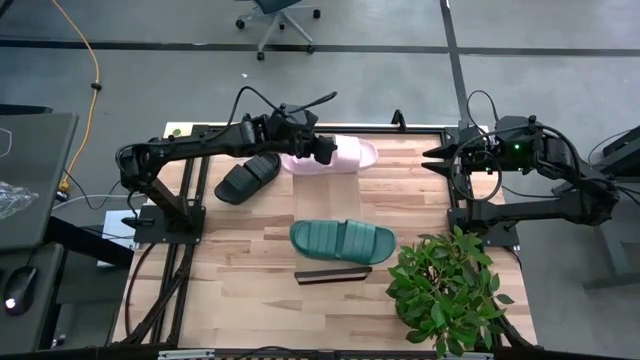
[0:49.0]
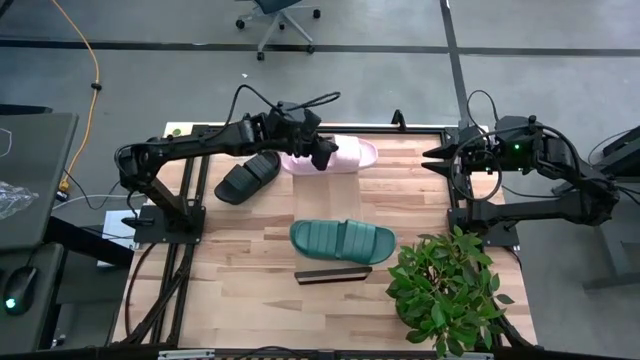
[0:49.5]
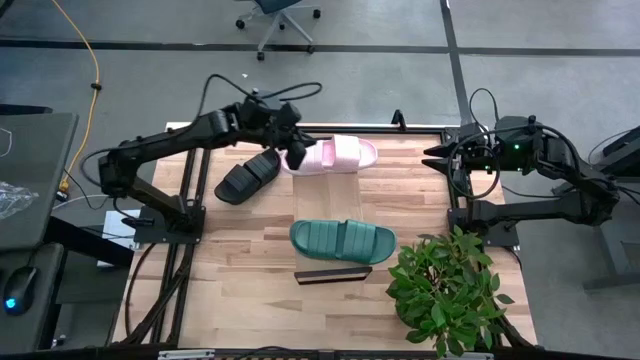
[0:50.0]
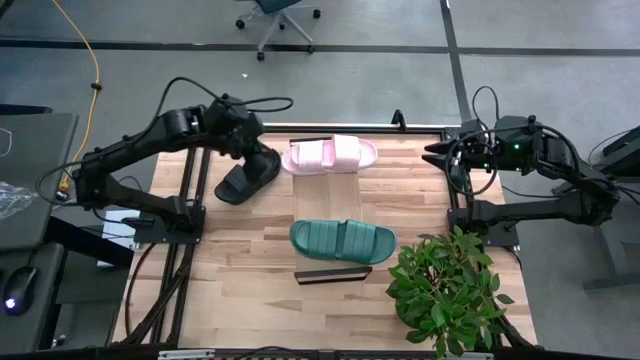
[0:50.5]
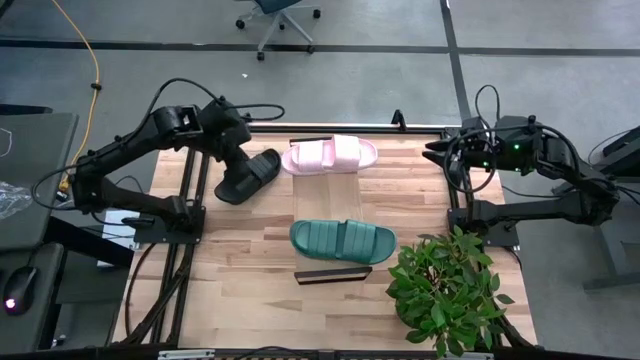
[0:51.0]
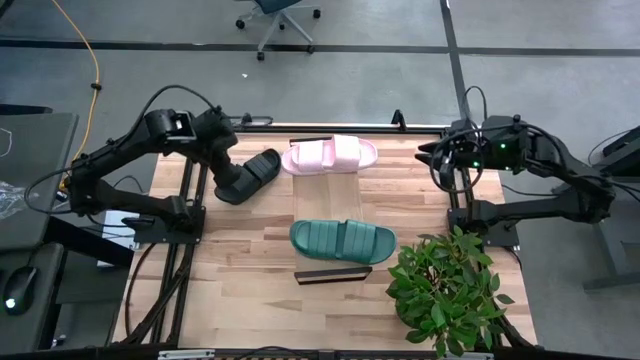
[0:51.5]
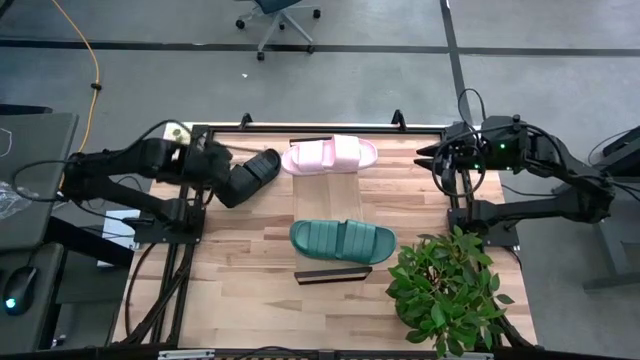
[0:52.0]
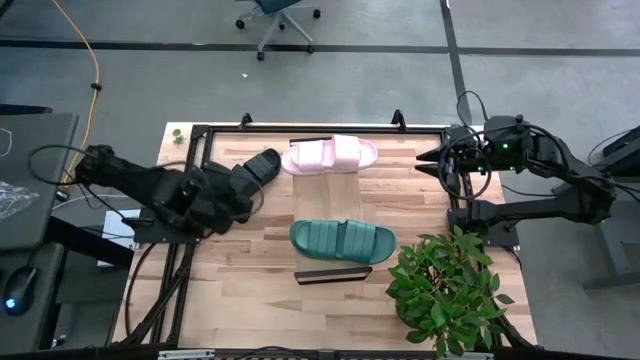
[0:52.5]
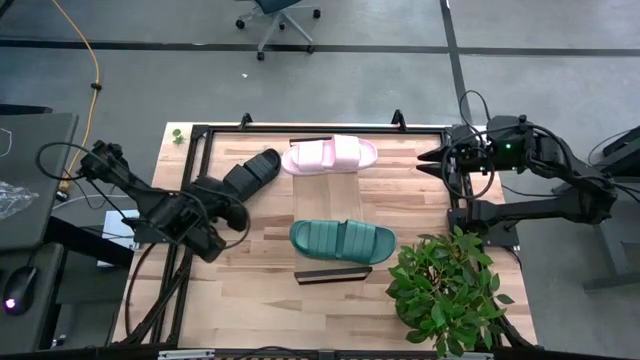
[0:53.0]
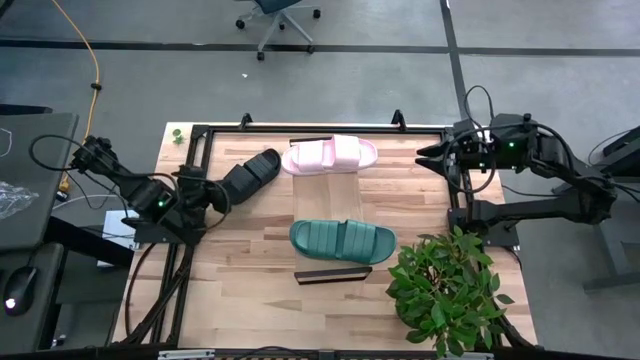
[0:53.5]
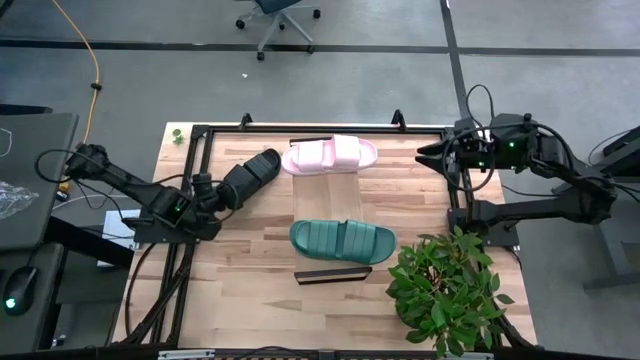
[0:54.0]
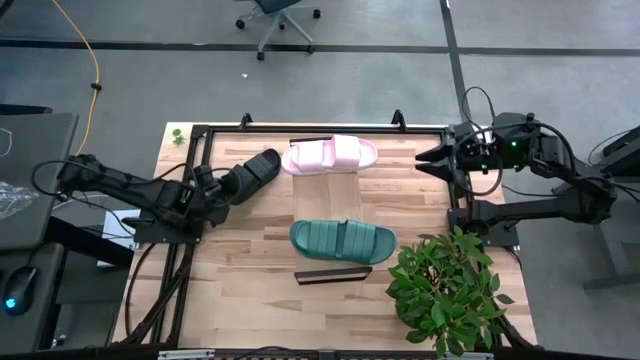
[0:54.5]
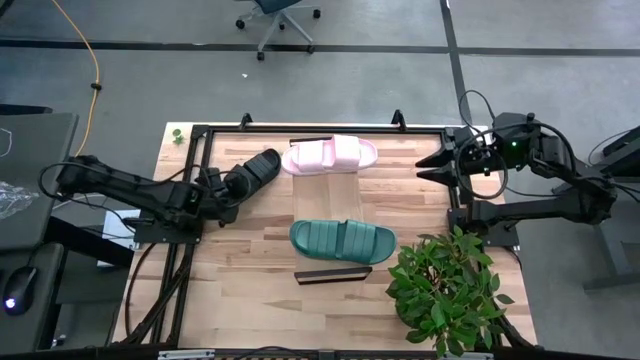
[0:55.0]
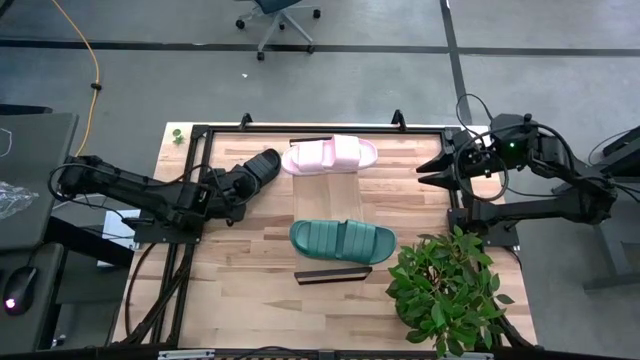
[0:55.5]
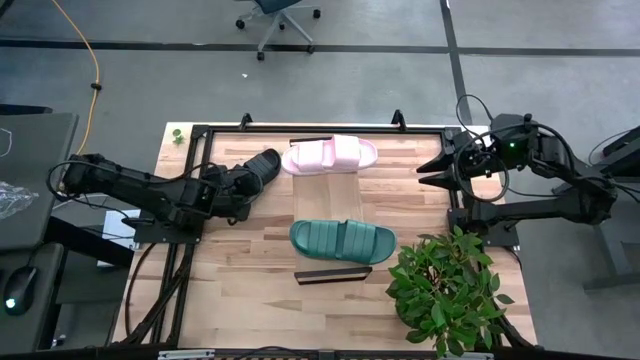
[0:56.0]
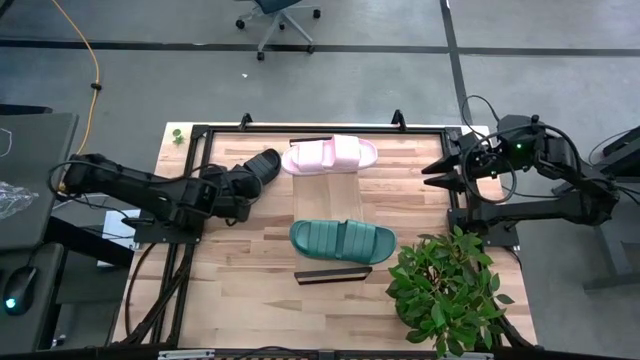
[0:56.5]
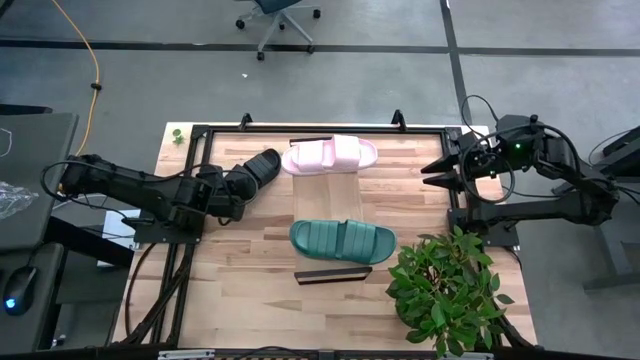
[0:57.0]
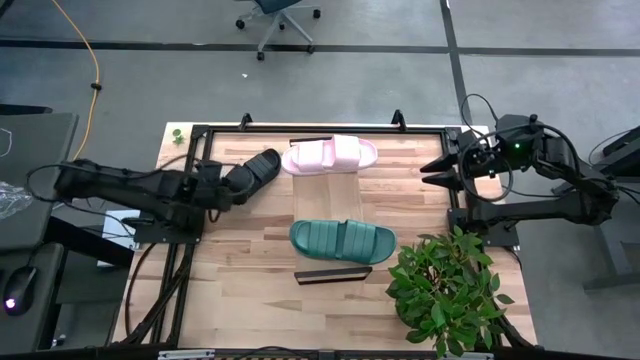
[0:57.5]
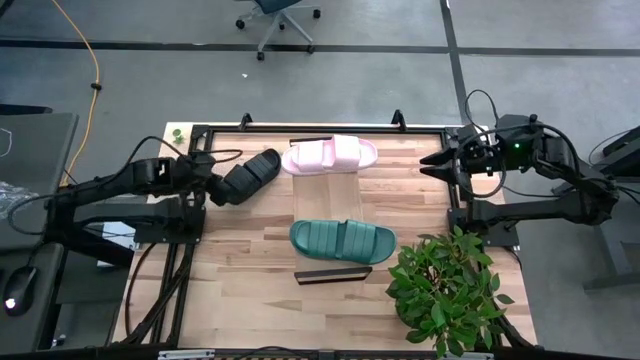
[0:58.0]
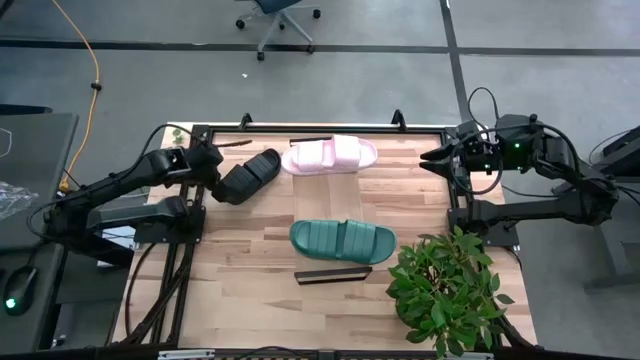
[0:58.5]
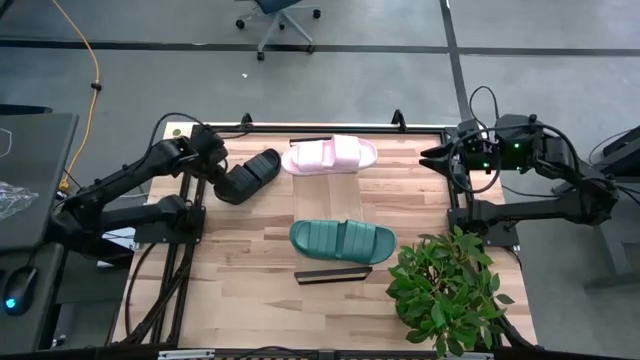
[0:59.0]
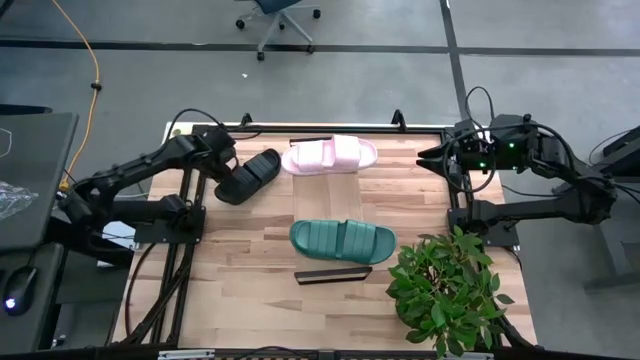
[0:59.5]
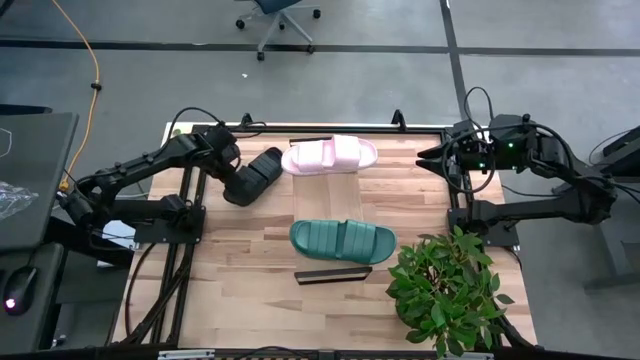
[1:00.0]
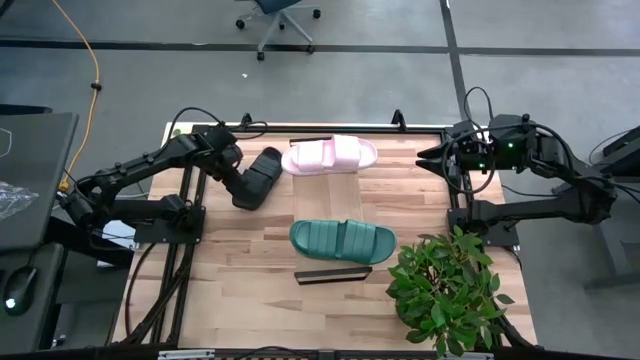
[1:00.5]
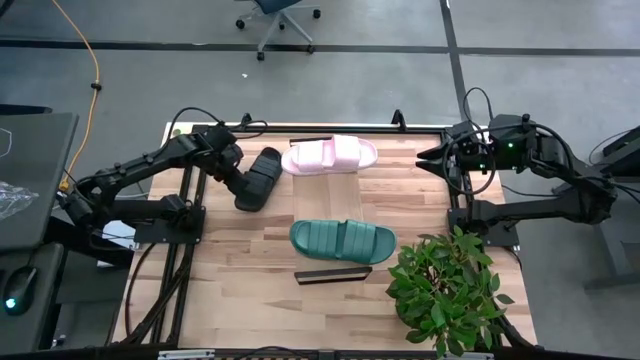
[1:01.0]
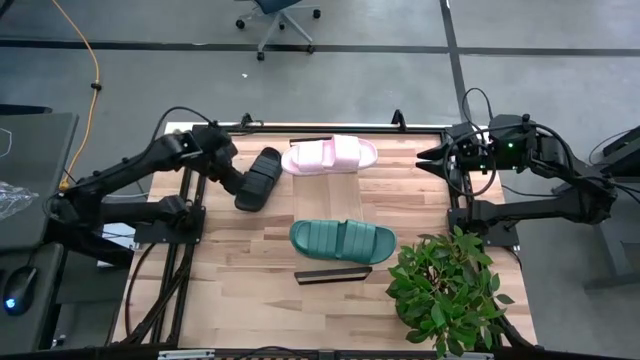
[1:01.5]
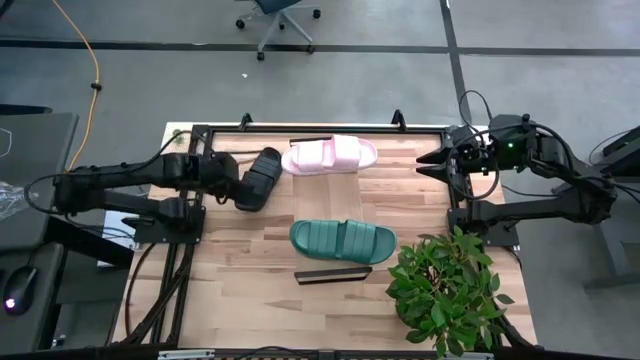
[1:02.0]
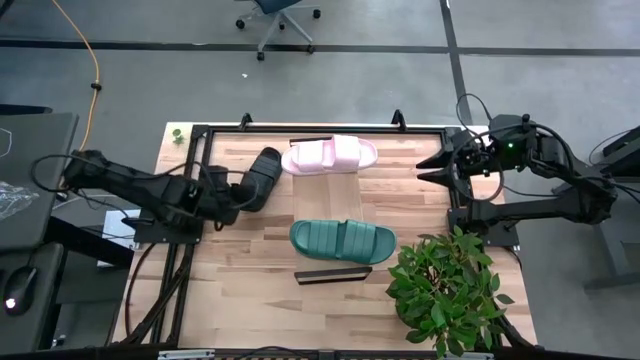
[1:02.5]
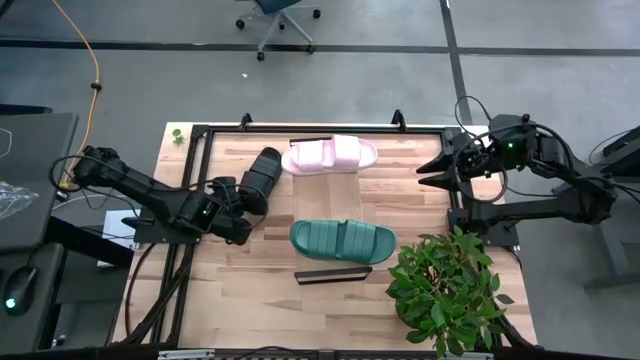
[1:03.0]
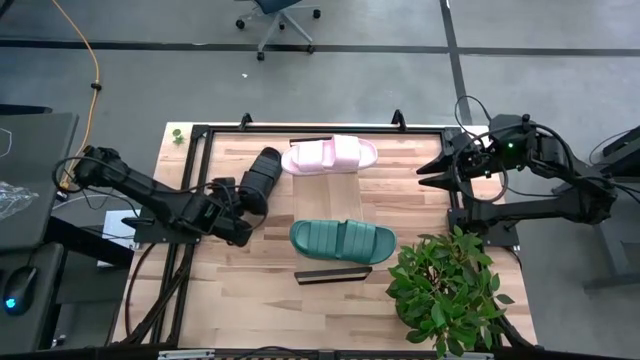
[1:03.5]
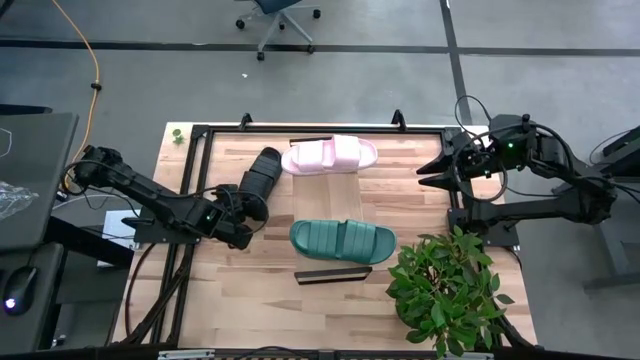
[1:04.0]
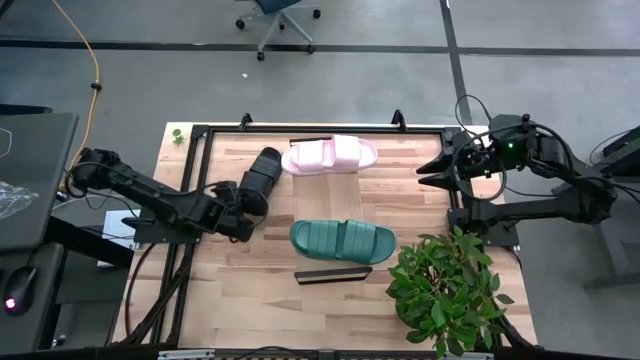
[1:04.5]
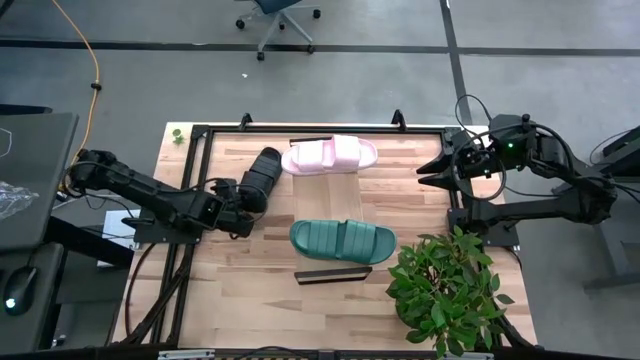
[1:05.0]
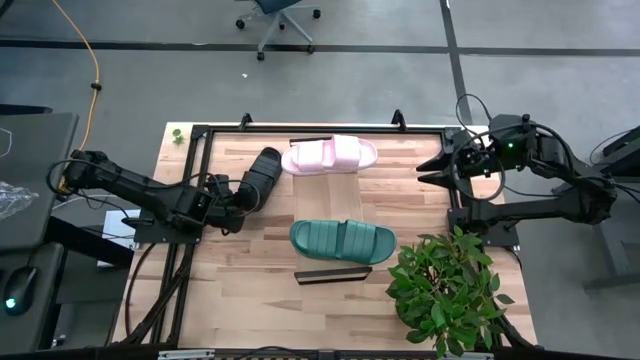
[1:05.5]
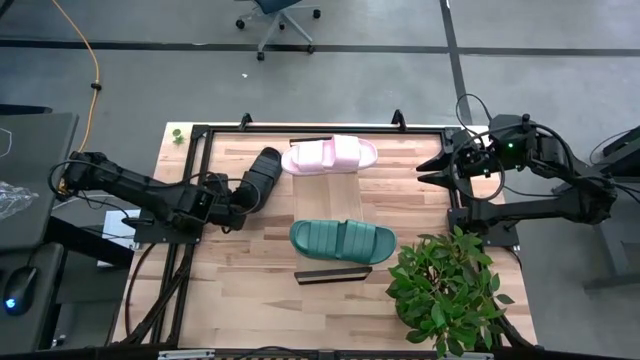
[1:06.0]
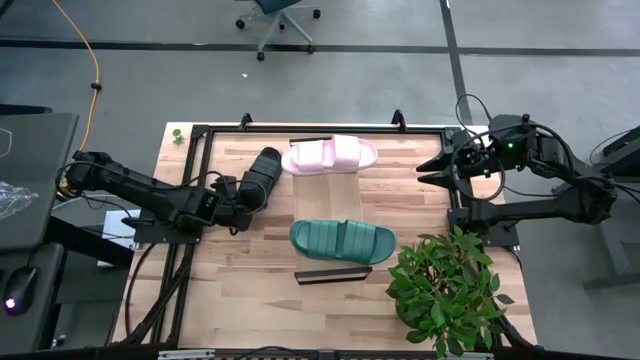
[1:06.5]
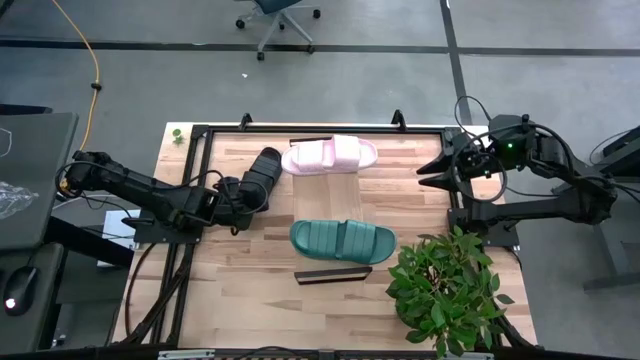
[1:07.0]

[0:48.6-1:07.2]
Task: Pick and place slippers onto the shelf
Put the black pair of slippers on the shelf

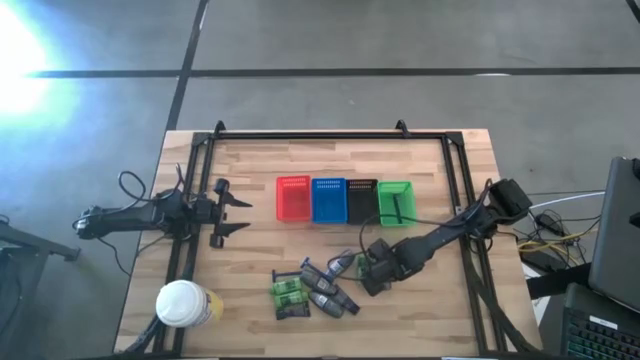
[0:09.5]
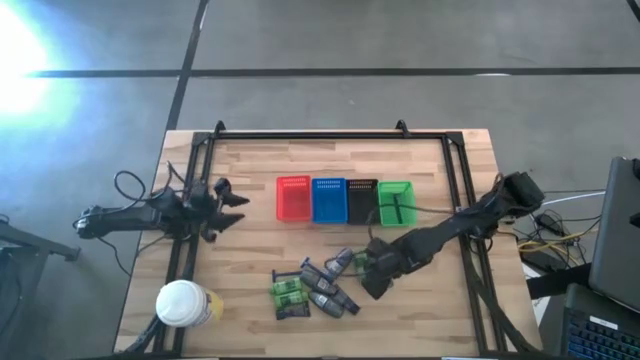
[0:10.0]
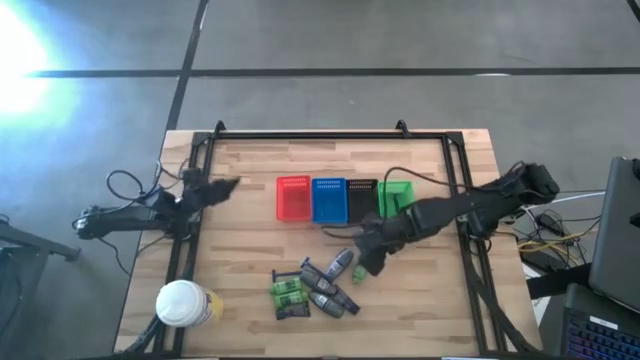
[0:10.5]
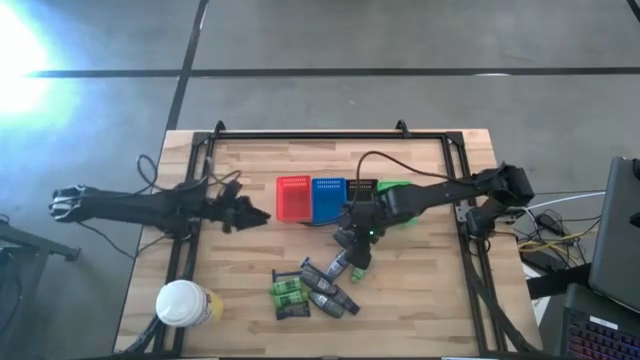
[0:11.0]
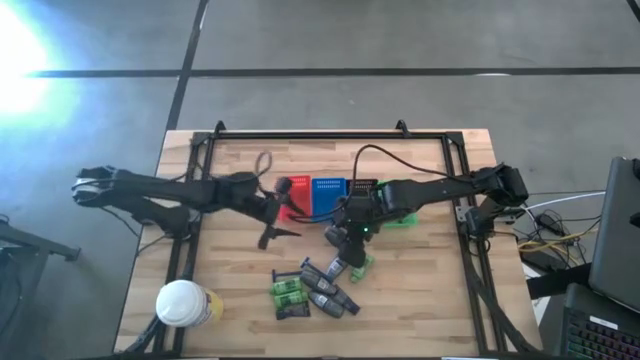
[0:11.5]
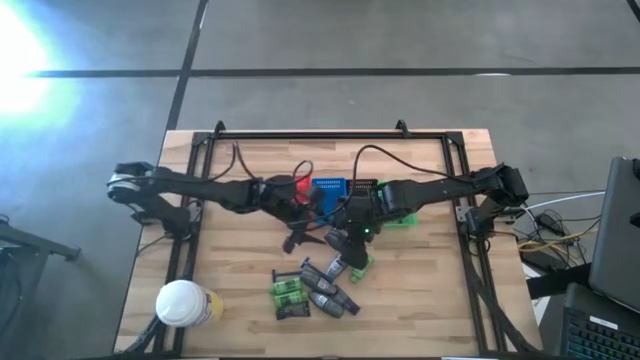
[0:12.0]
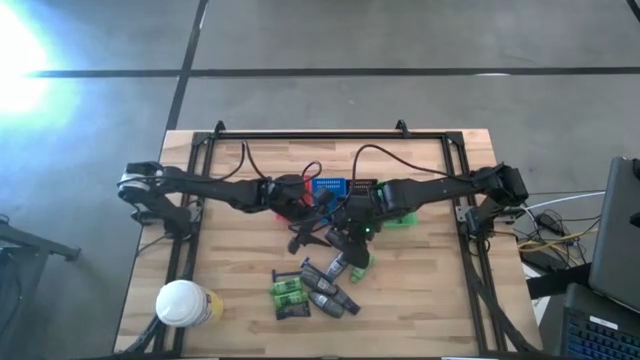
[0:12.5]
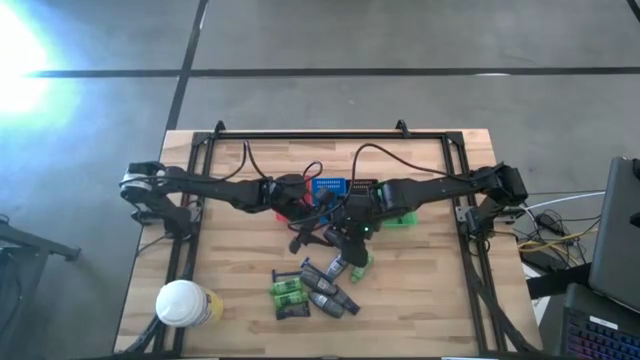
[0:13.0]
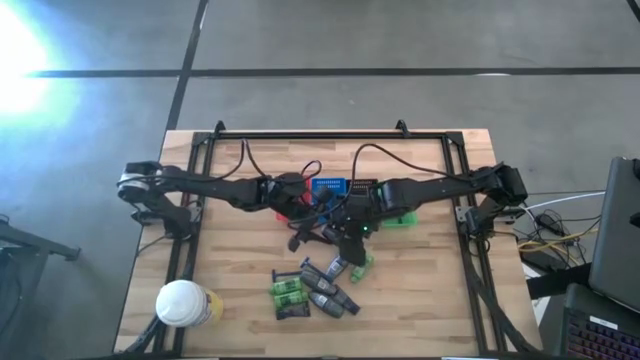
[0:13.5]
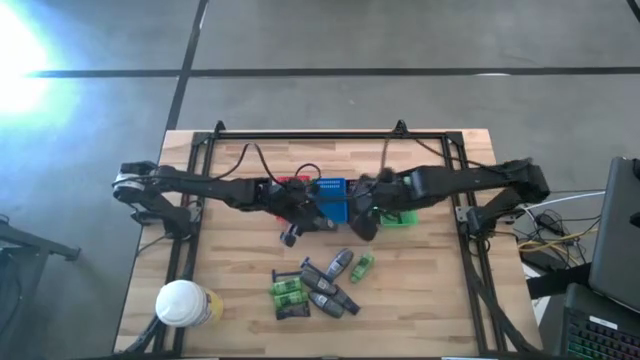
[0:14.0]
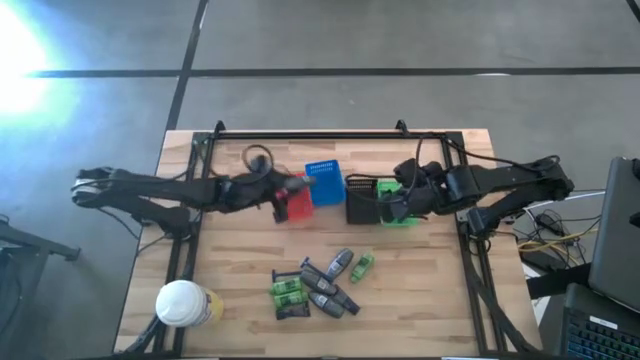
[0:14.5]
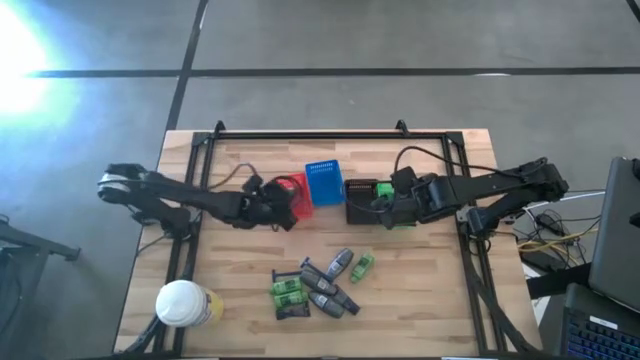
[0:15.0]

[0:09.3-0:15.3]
Task: Pick & Place Travel size toiletries
Put the gray deodorant into the red bin
